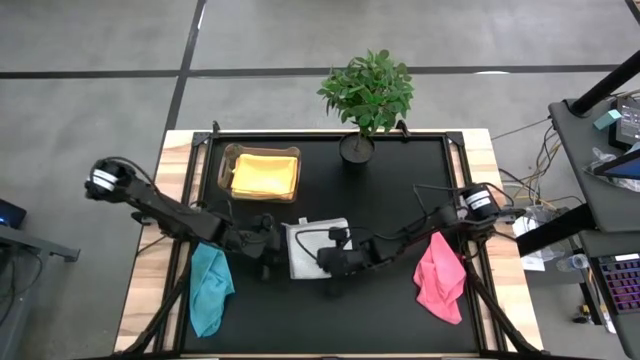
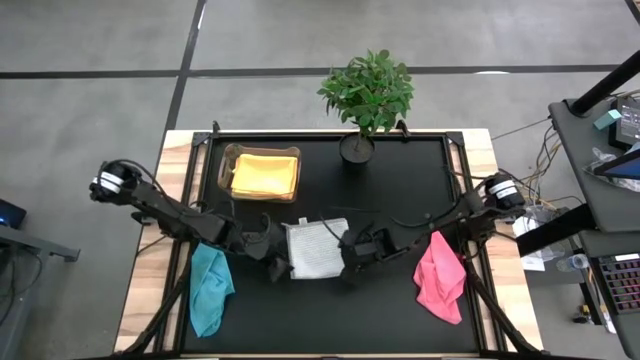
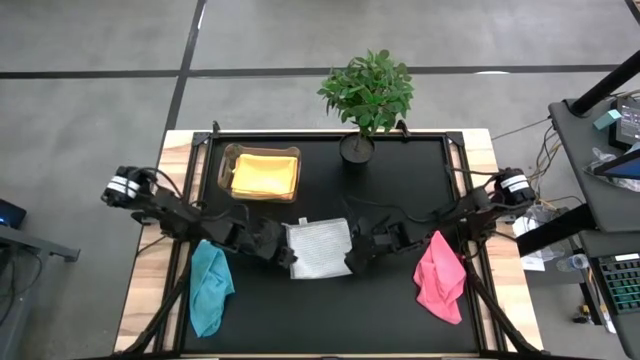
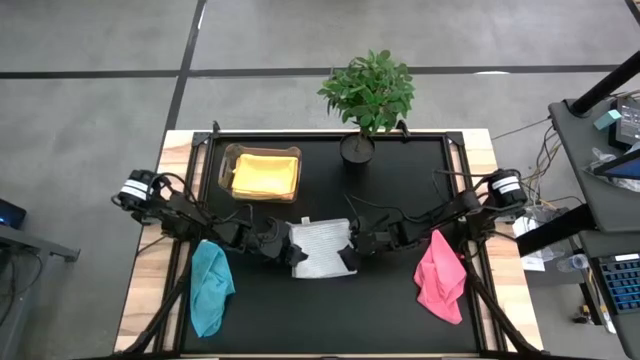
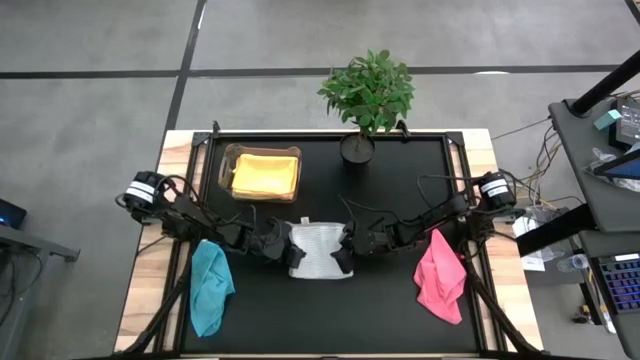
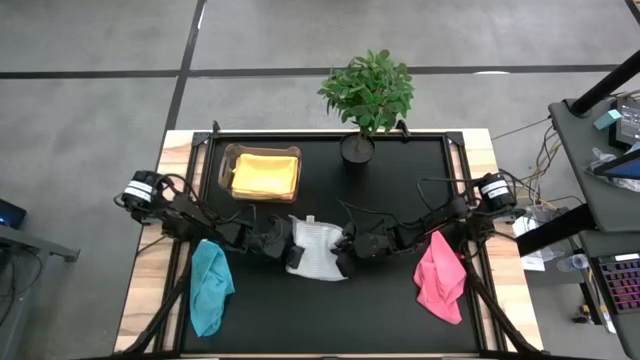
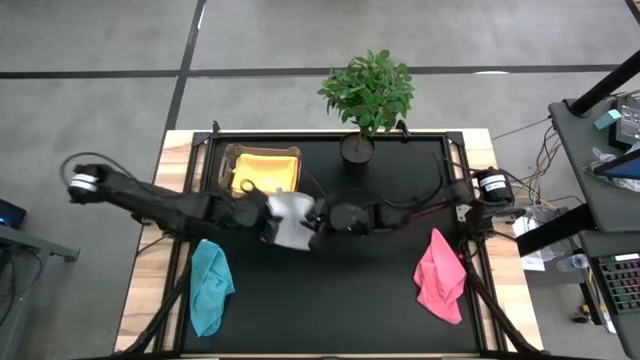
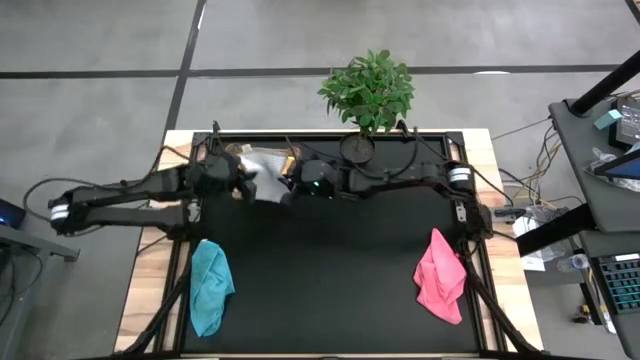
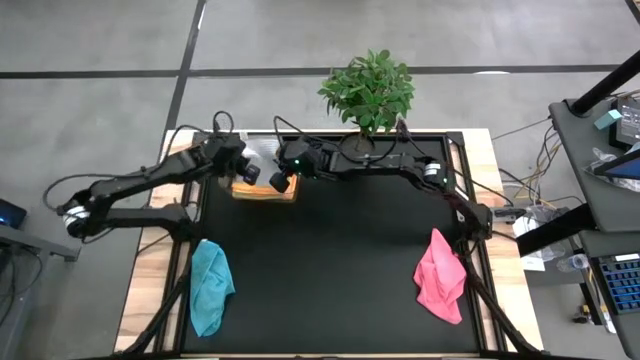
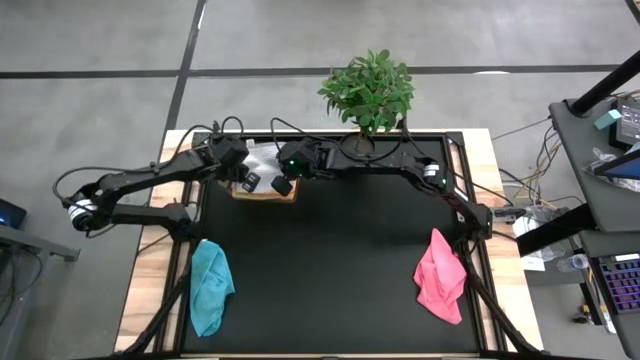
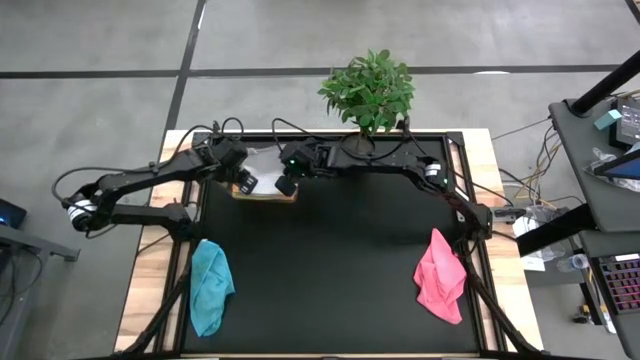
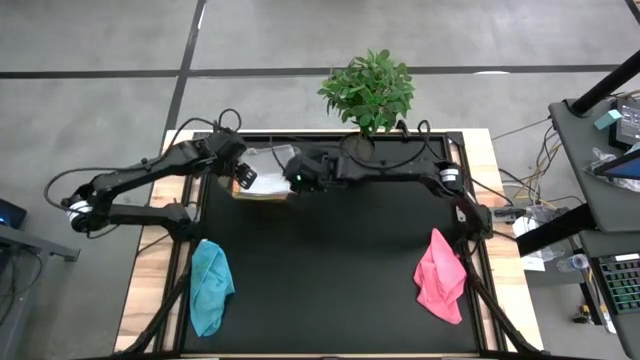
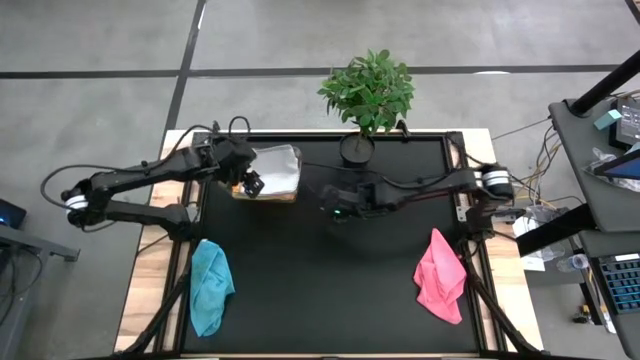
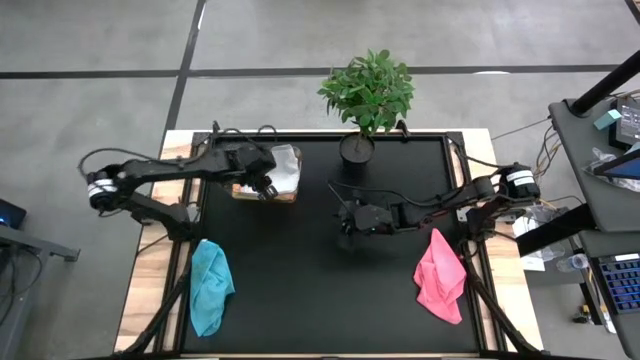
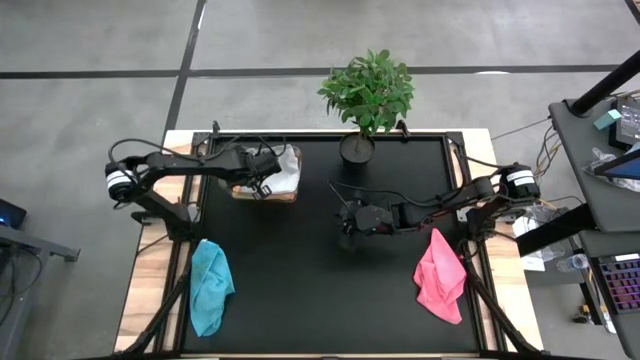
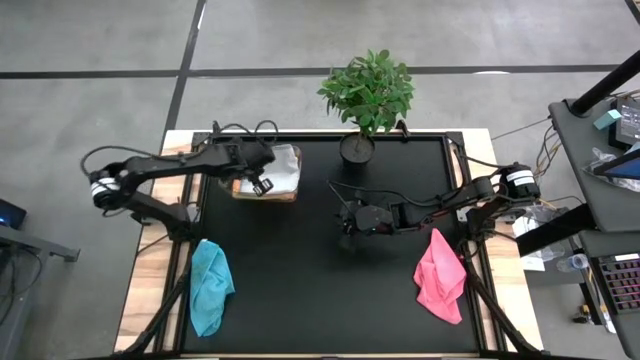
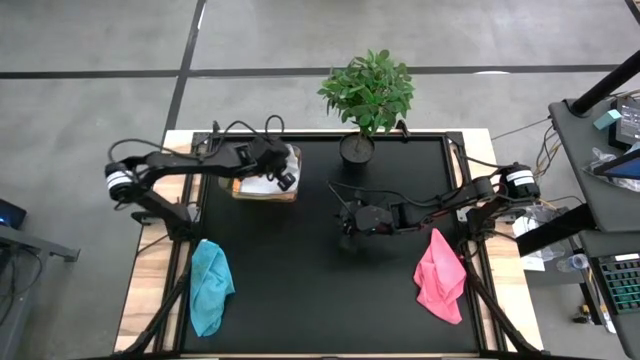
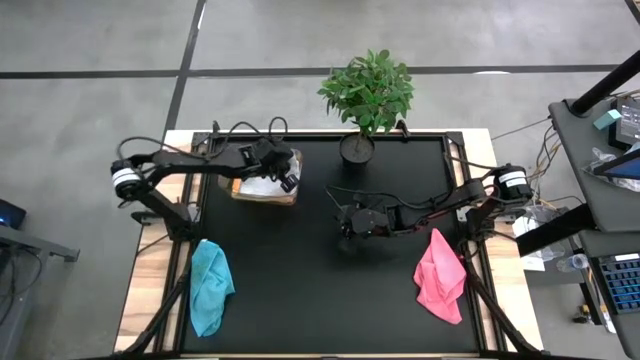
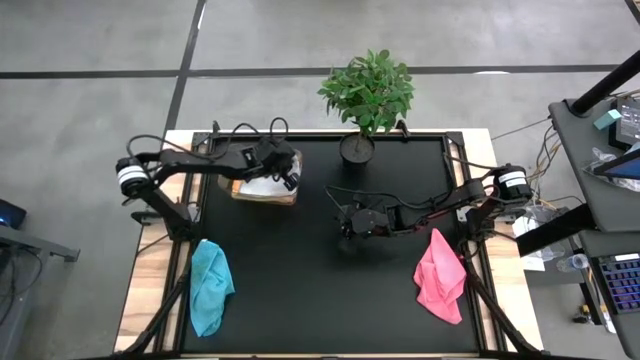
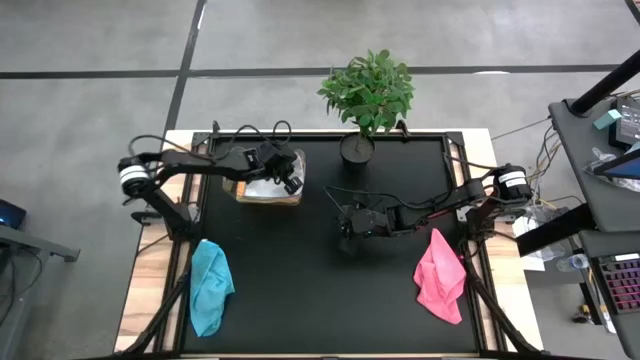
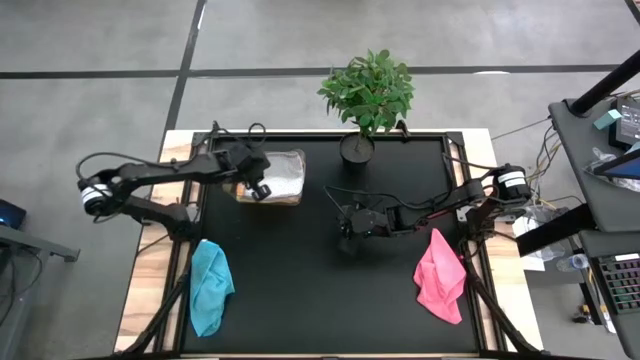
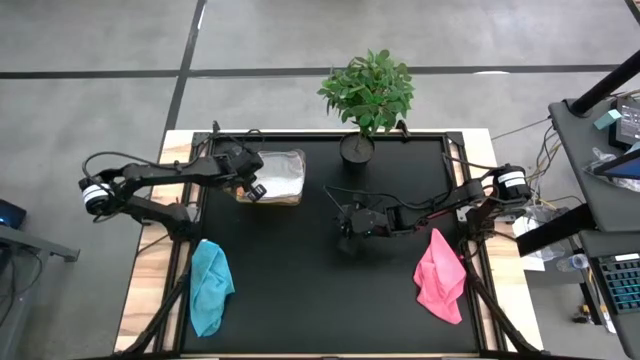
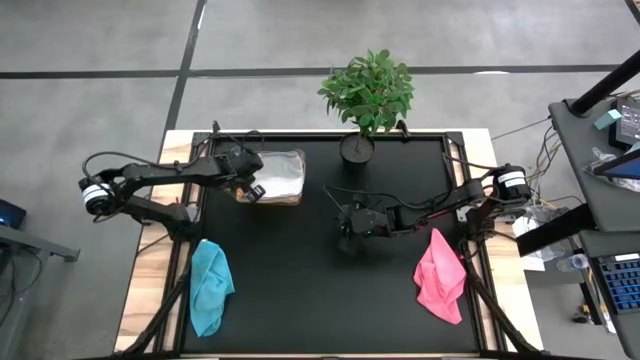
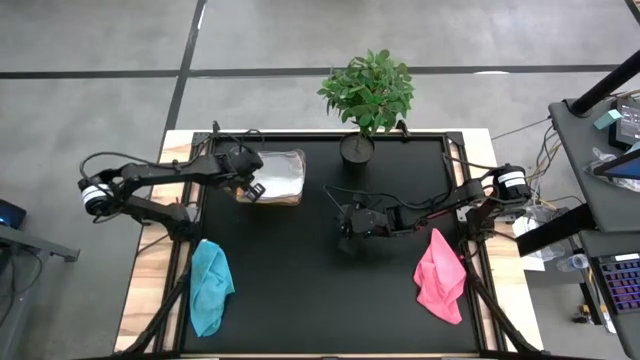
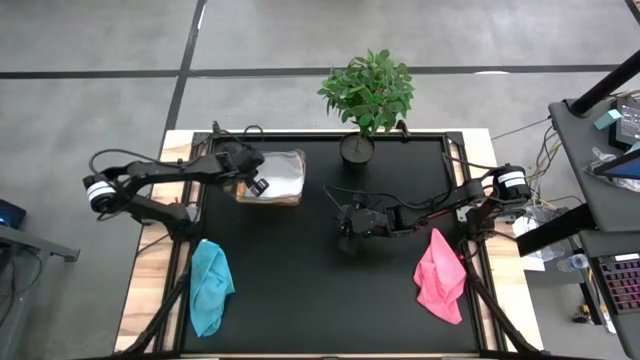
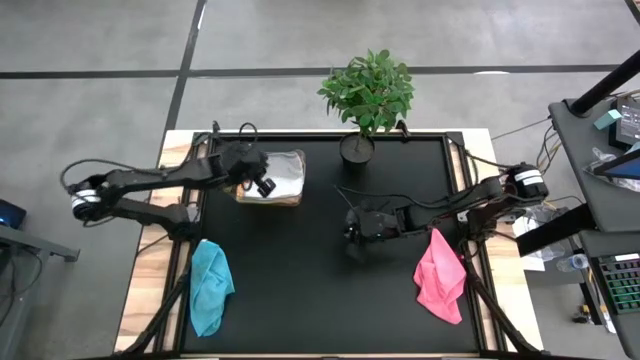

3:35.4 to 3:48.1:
Task: Fold microfiber towels
Put the gray towel into the transparent bin

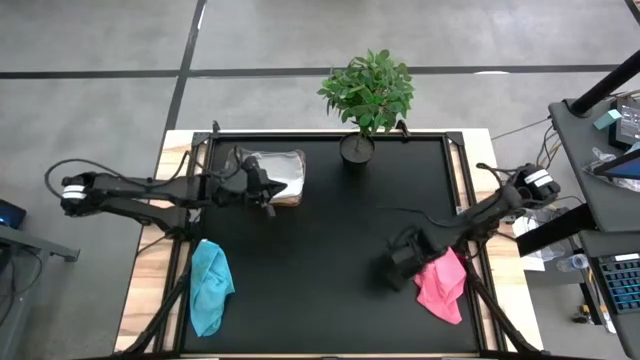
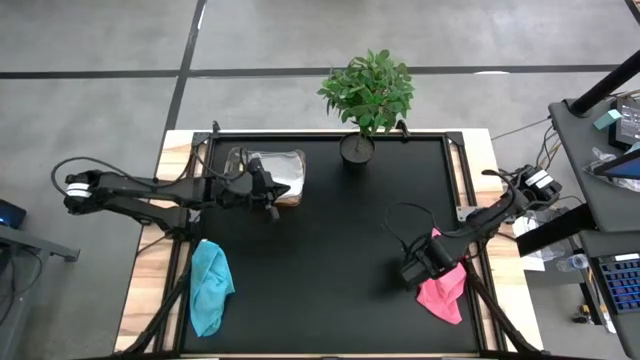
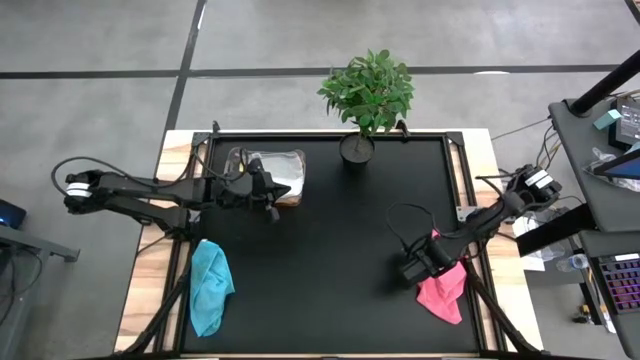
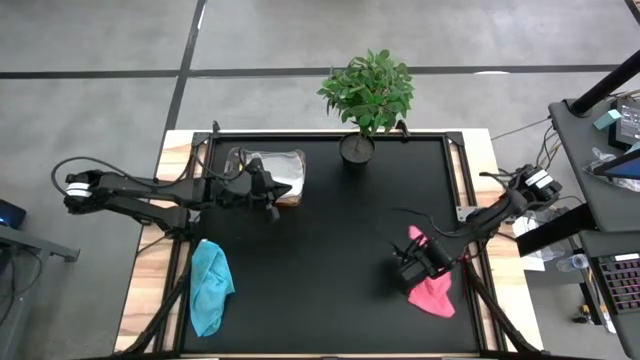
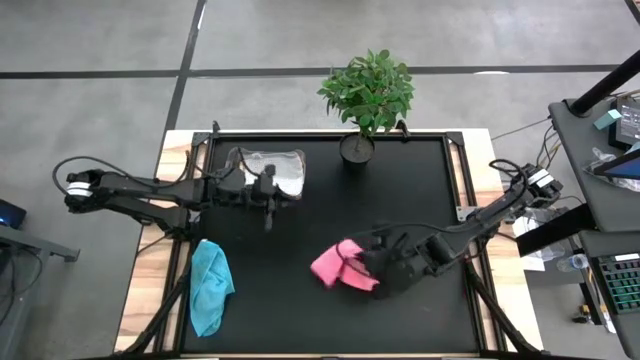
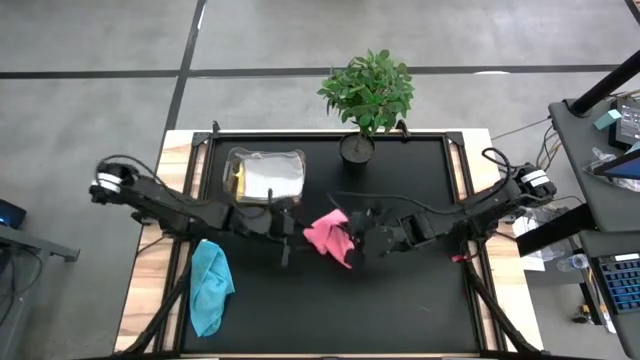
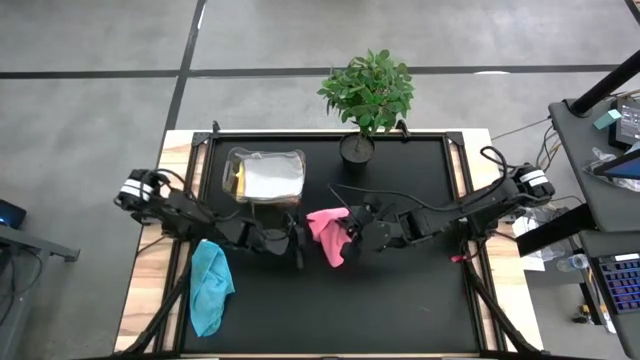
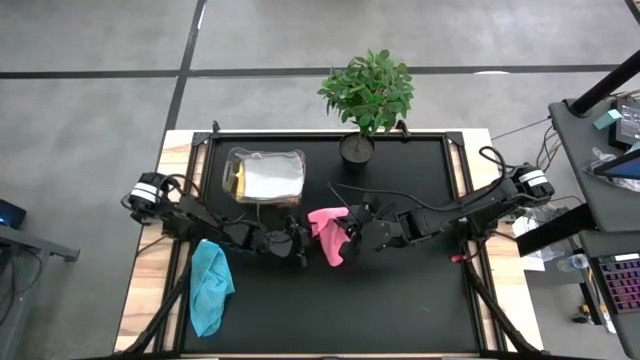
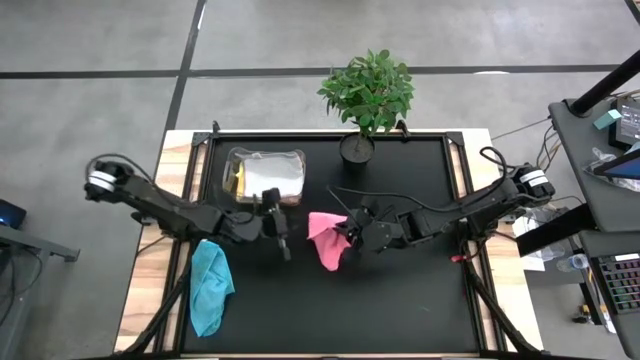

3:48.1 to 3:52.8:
Fold the pink towel

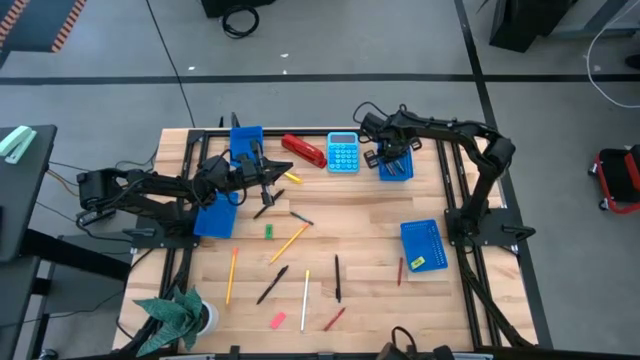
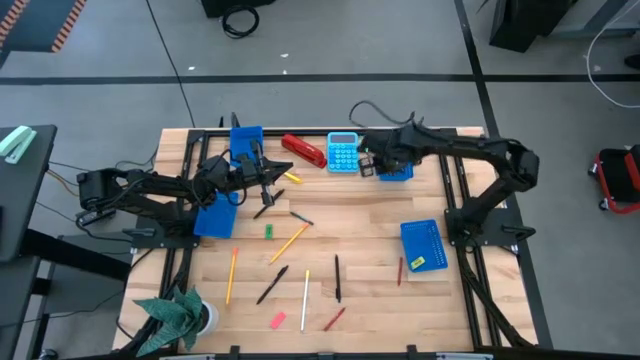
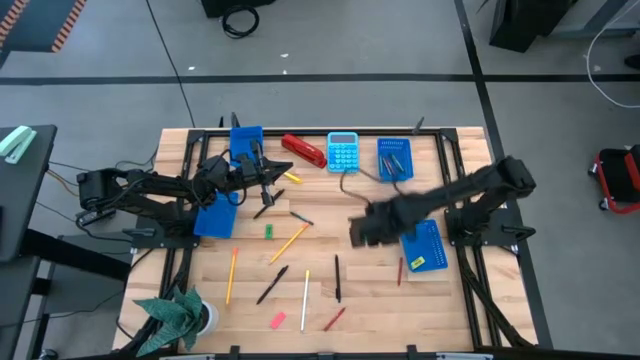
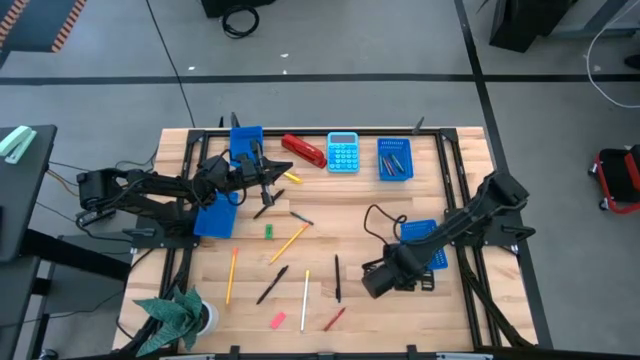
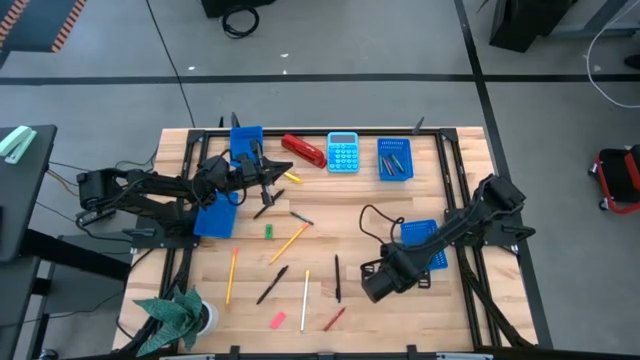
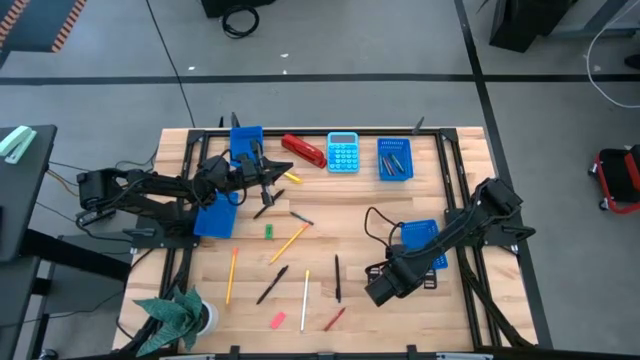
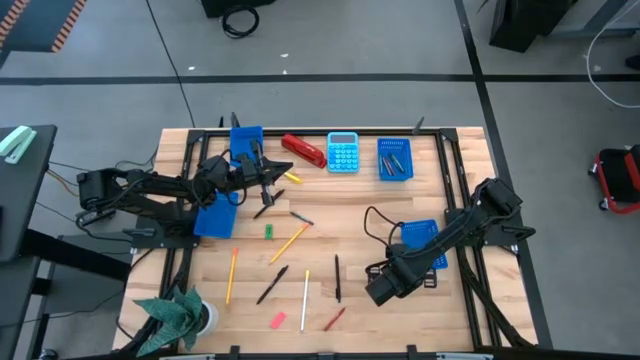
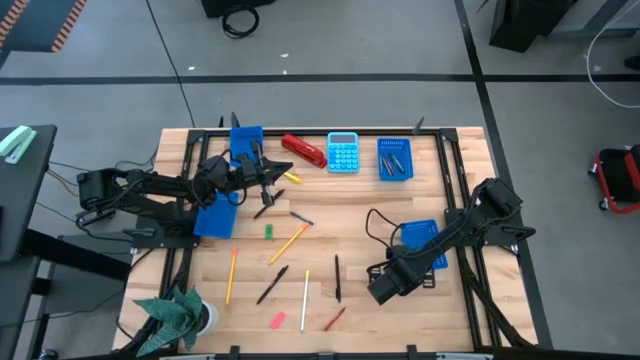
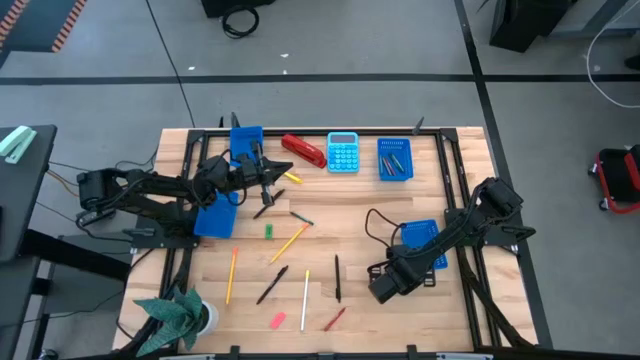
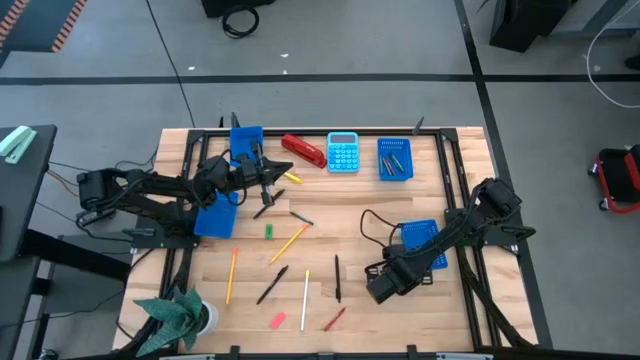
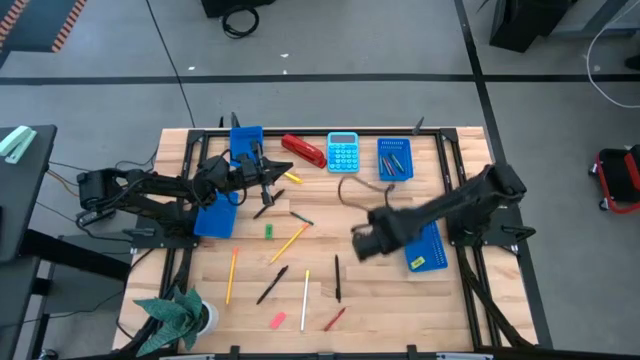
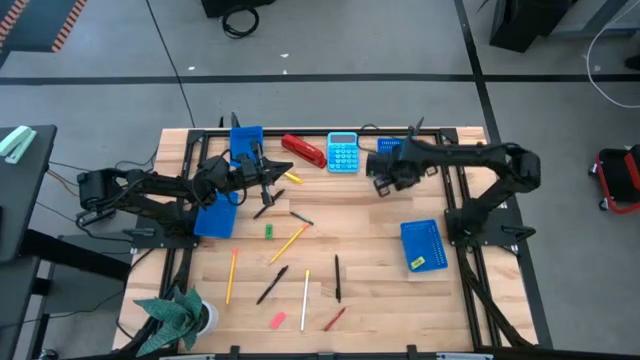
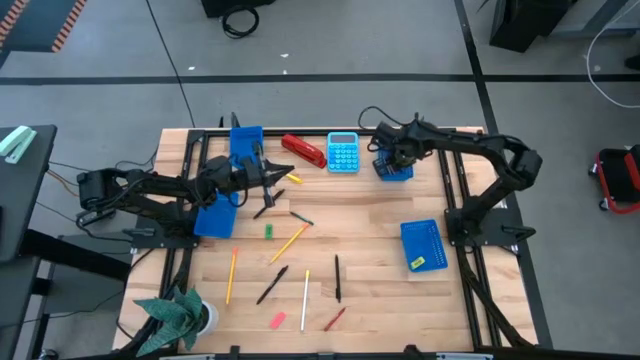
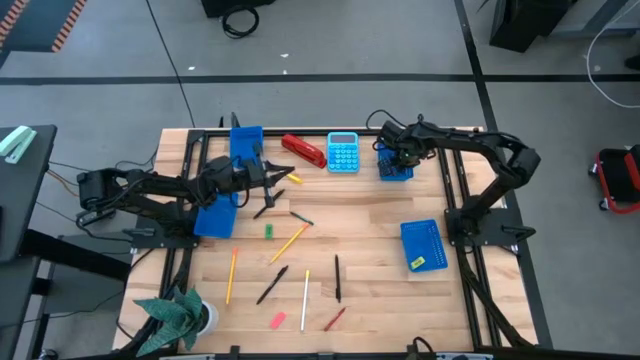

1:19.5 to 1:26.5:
Task: Sort crayons/erasers/pens/pencils in bins
Put the right red crayon into the top right bin
